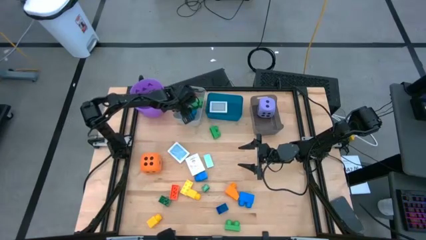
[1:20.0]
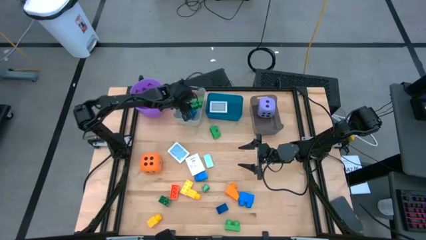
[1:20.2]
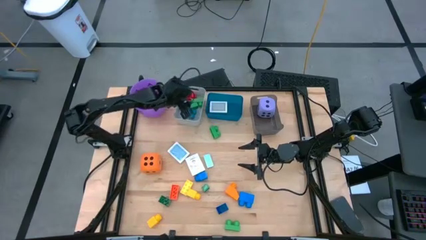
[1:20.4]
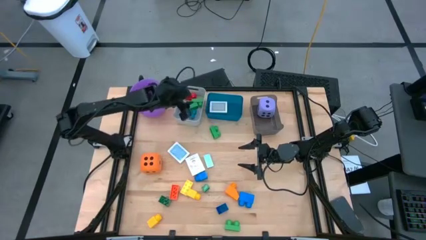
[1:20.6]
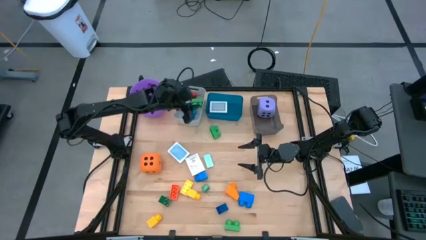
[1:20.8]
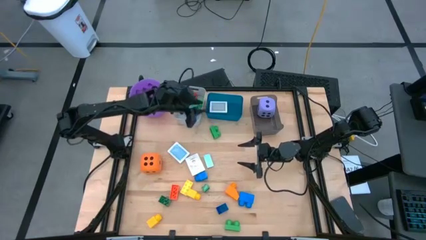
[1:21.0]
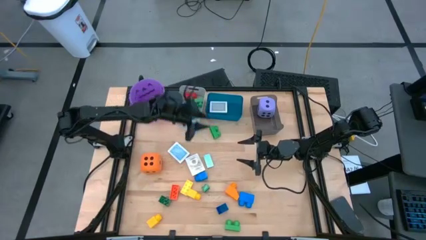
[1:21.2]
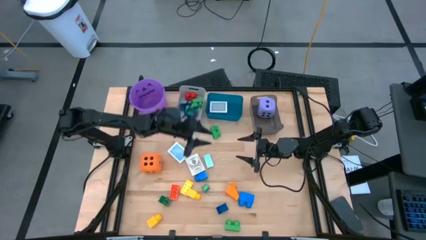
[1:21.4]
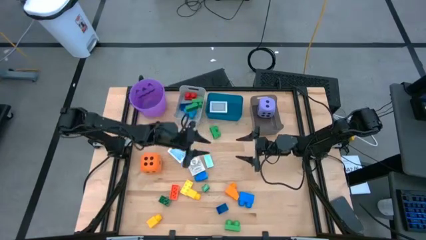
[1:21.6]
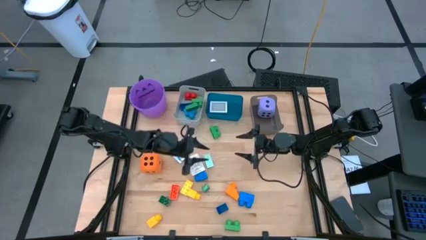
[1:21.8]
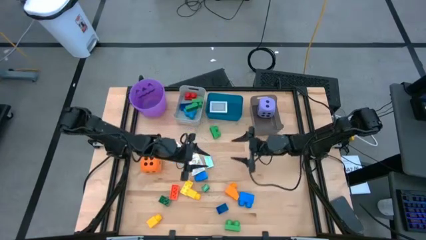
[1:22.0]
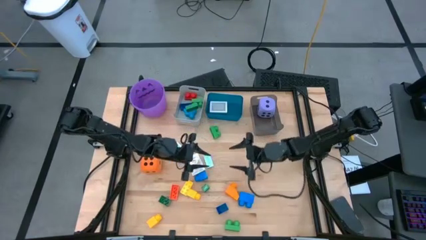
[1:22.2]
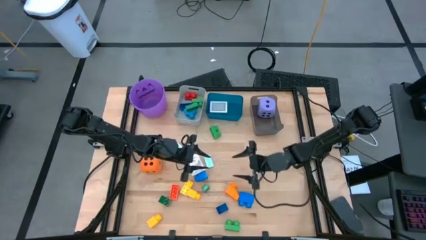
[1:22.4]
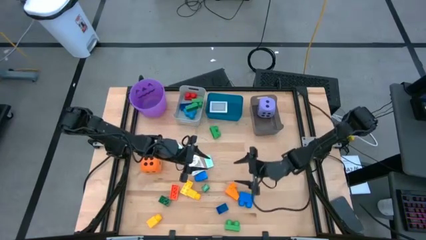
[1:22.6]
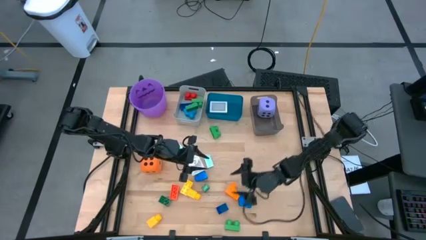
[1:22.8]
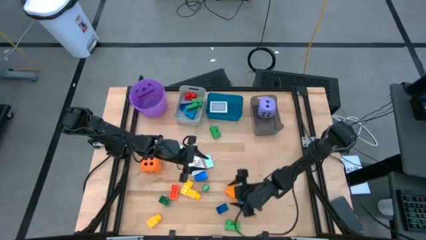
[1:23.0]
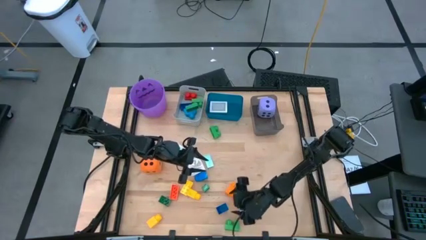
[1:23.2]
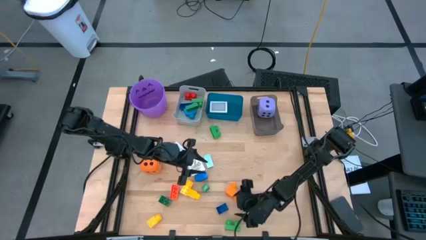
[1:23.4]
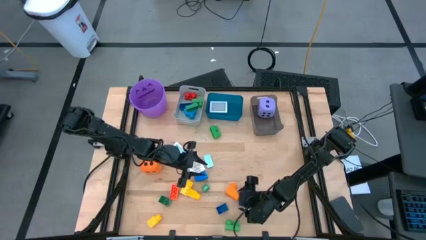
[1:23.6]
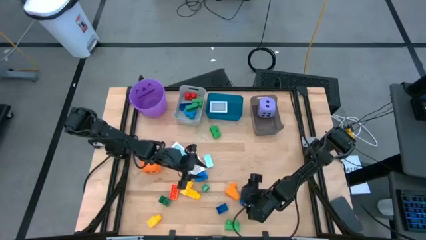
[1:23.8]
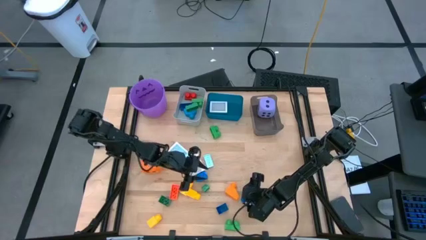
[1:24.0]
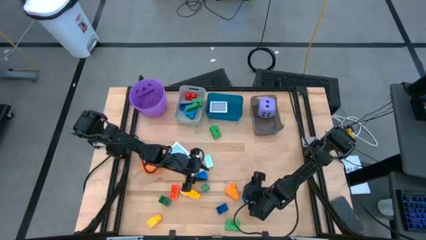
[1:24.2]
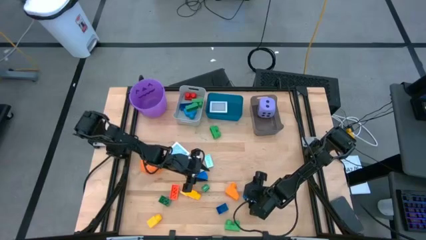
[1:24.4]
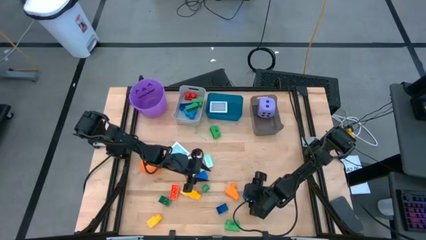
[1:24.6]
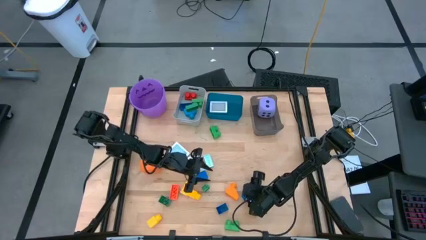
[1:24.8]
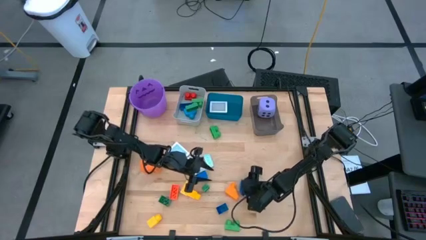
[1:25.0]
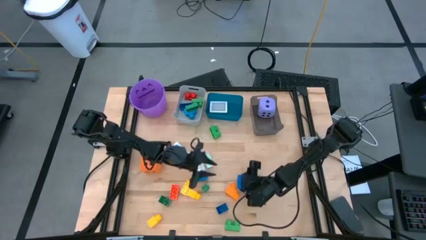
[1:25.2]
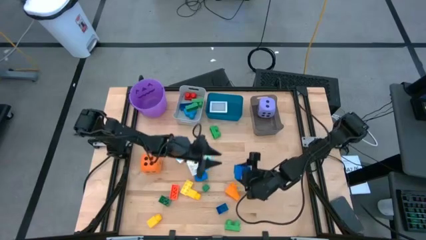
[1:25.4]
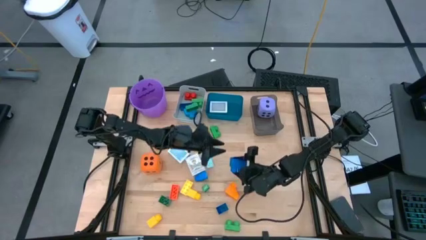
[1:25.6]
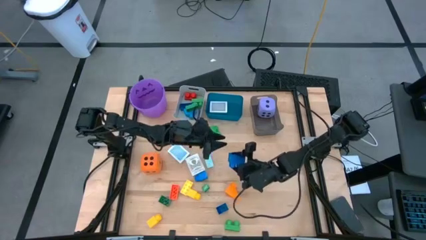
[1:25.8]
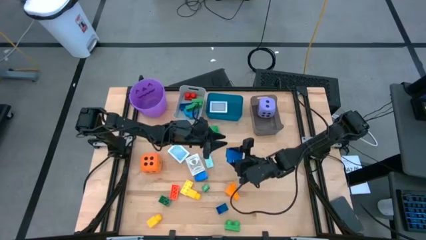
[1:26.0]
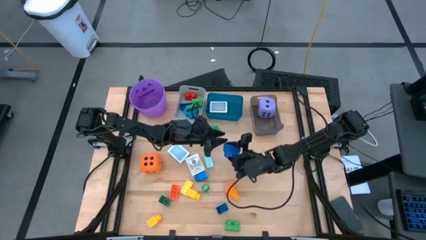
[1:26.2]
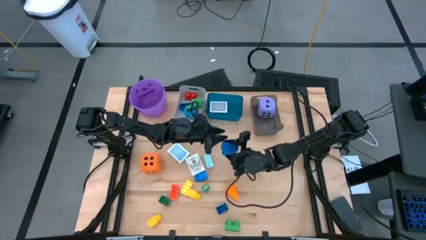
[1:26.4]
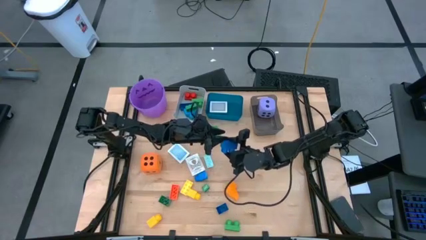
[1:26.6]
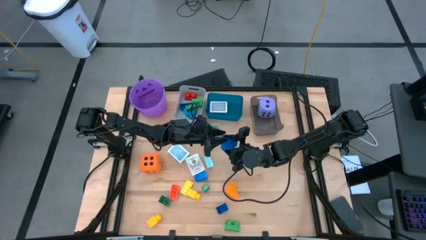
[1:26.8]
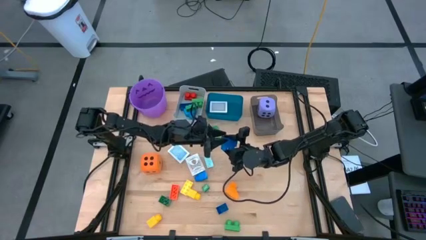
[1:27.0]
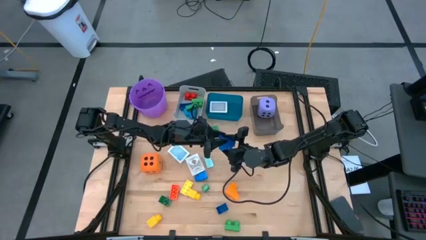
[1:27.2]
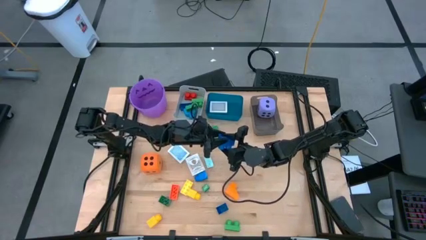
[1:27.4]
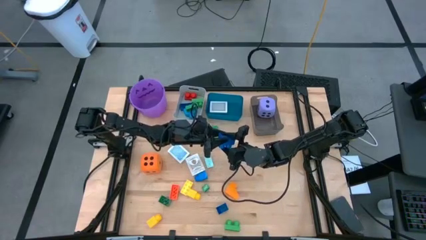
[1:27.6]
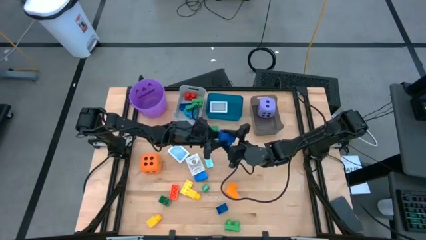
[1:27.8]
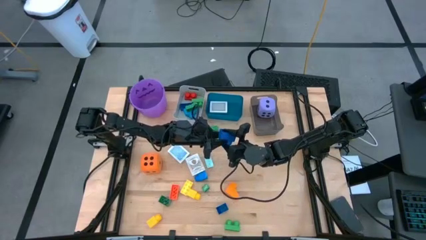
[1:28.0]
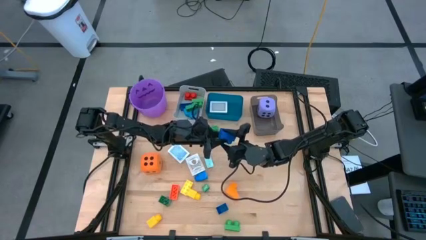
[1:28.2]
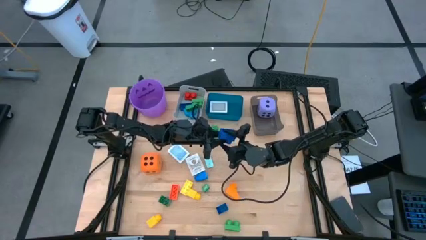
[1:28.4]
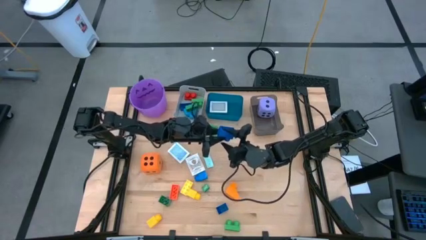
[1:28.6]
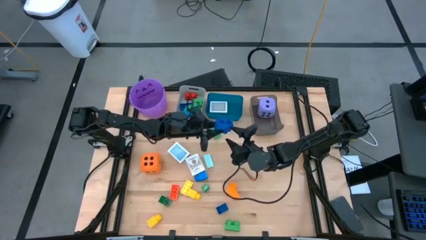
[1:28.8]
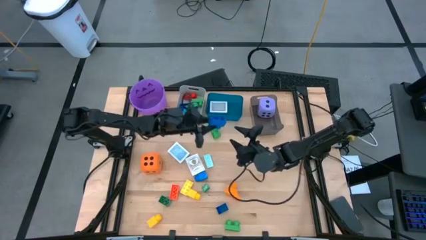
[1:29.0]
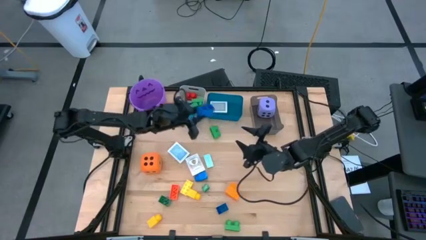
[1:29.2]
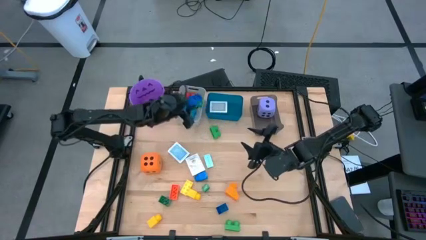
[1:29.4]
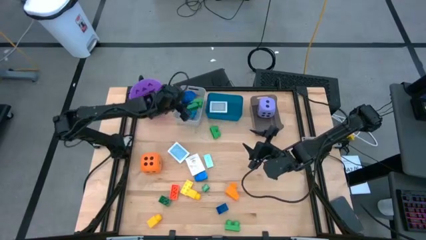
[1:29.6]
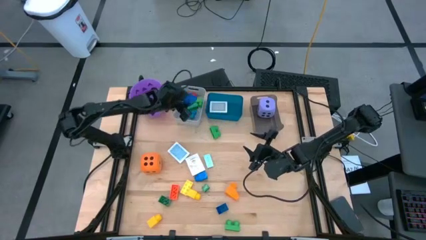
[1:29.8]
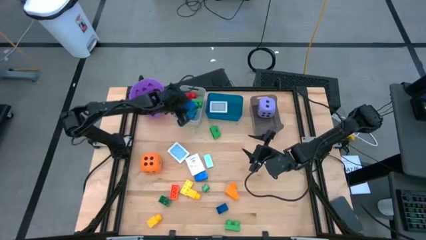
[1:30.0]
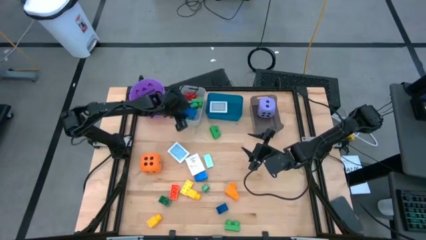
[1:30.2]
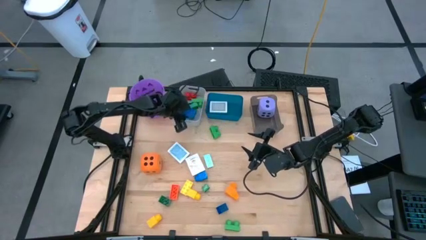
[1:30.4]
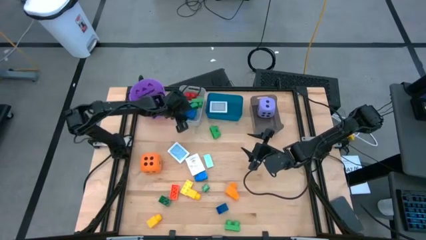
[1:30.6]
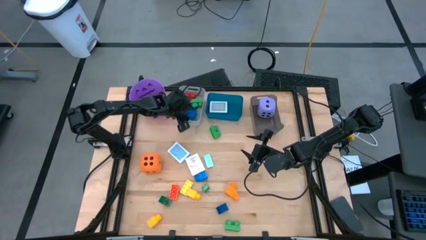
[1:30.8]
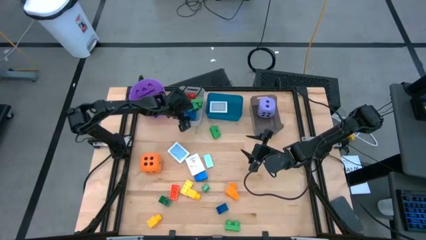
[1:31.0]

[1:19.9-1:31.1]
Task: Pick & Place Toys
Put the blue game piece into the gray bin

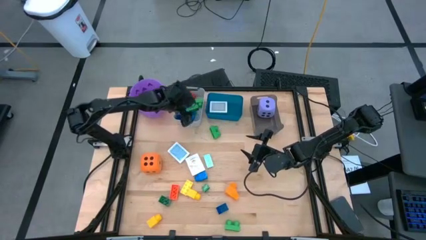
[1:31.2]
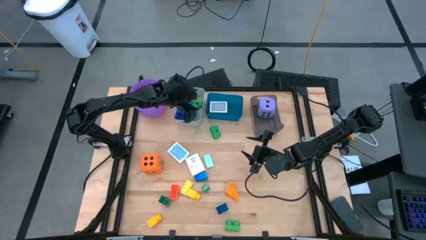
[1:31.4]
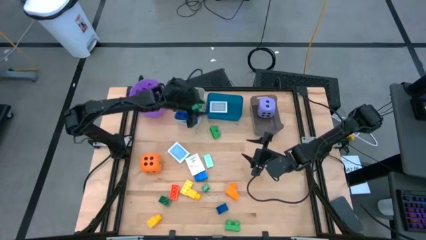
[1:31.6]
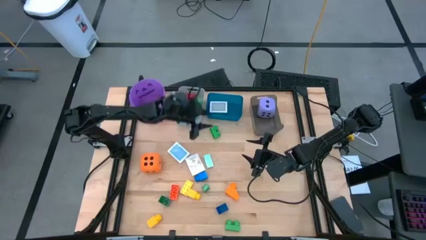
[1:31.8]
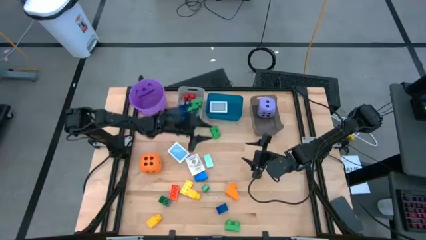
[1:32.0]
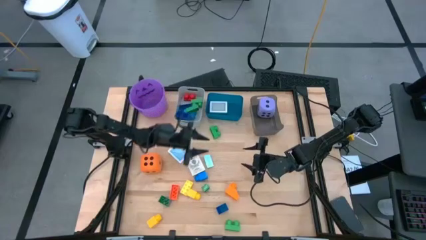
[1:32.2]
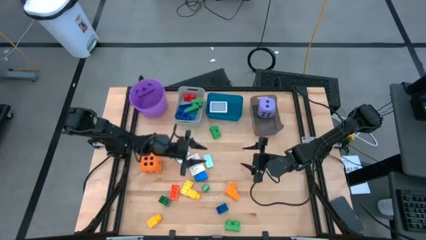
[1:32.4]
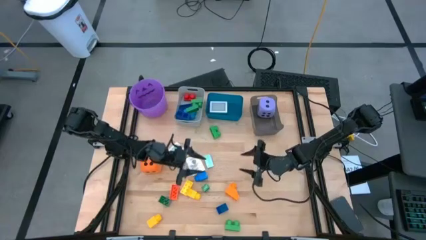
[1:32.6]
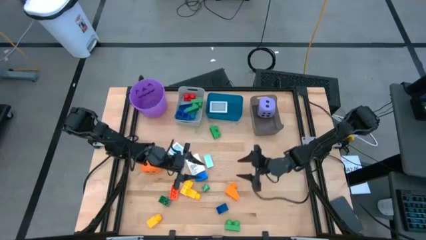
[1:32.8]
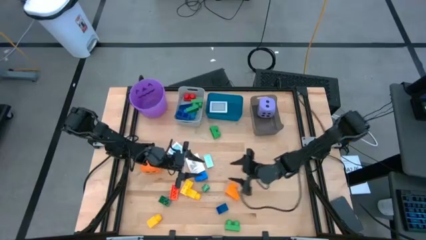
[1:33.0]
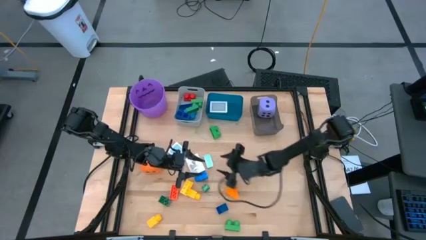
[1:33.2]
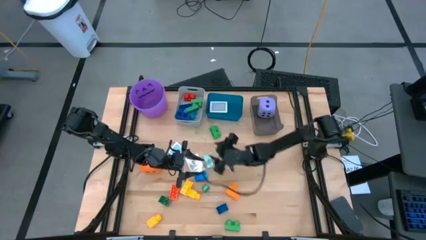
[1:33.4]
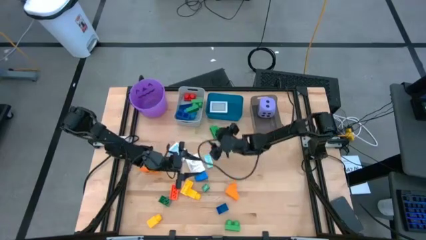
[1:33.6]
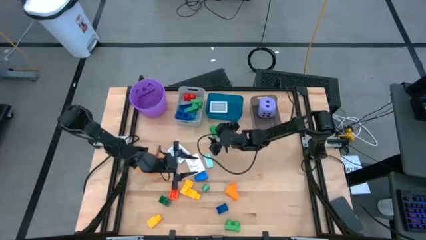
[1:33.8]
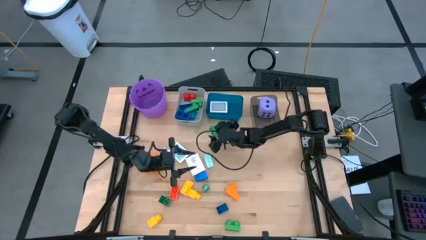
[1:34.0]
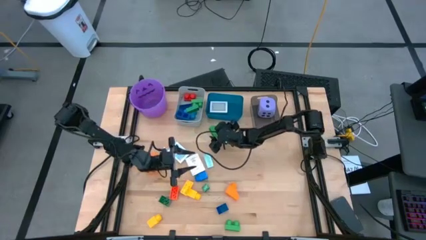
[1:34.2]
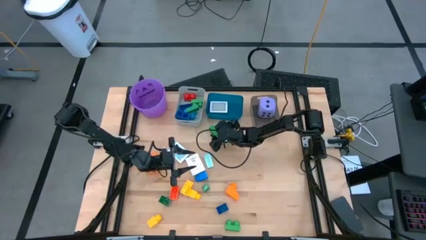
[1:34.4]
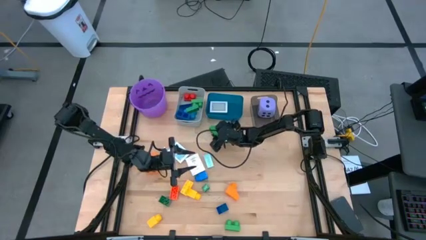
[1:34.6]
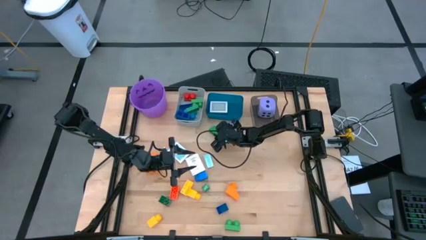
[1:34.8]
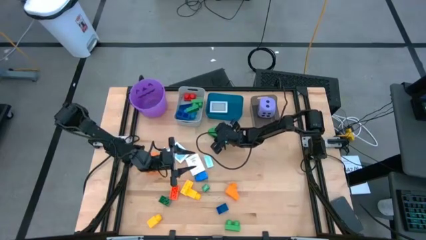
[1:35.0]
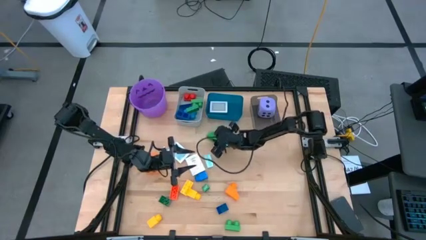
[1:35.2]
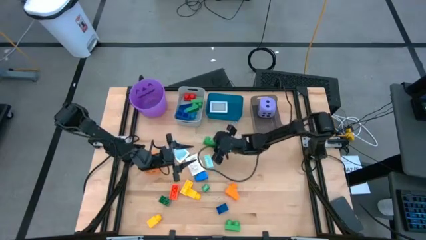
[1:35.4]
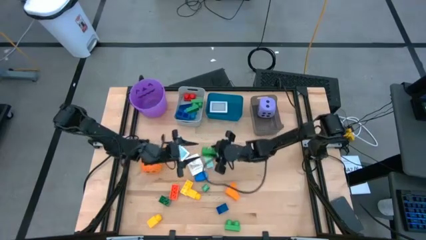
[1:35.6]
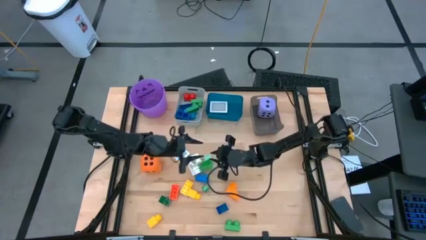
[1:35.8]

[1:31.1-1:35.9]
Put the top green game piece into the gray bin
